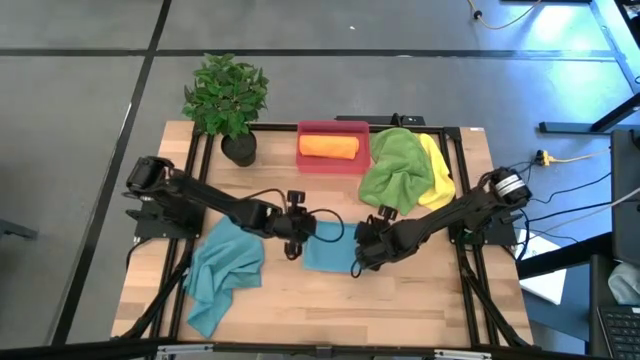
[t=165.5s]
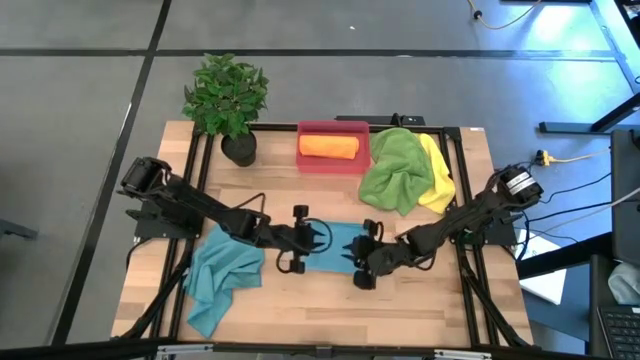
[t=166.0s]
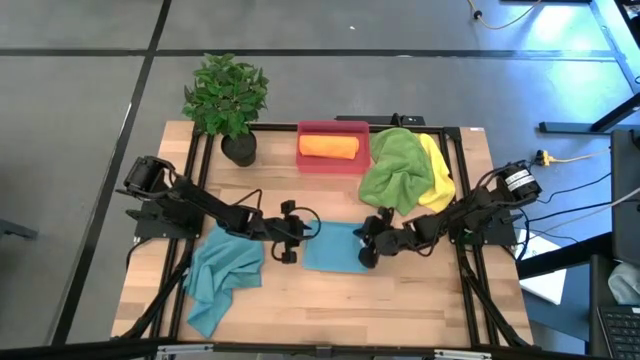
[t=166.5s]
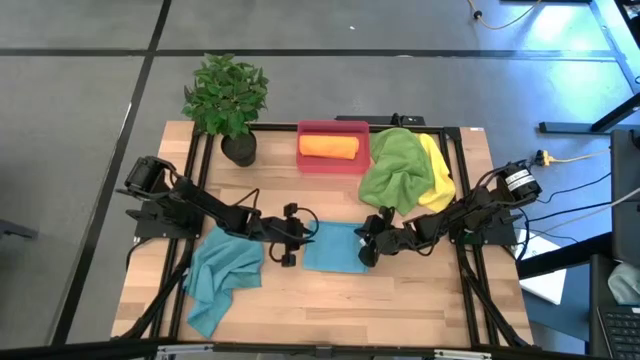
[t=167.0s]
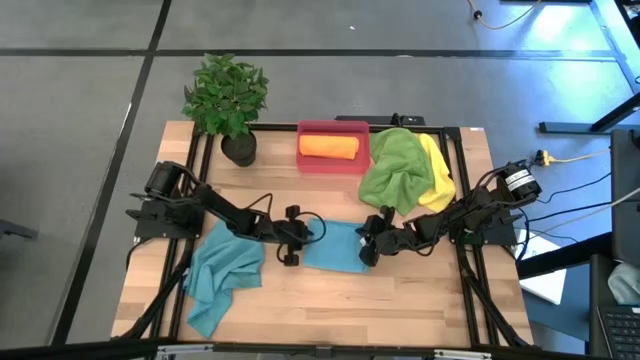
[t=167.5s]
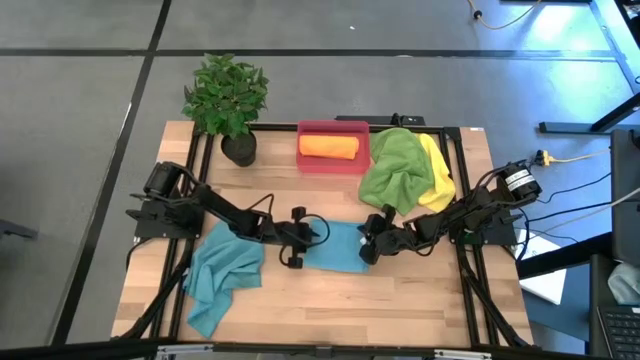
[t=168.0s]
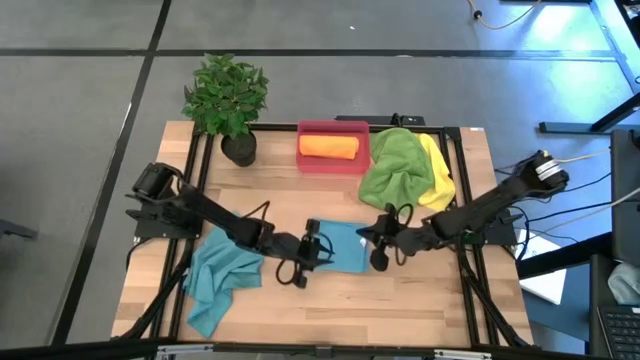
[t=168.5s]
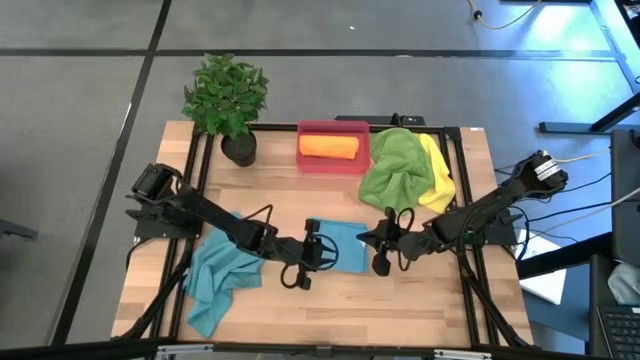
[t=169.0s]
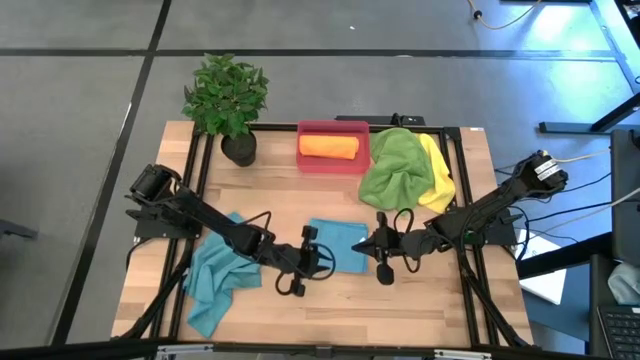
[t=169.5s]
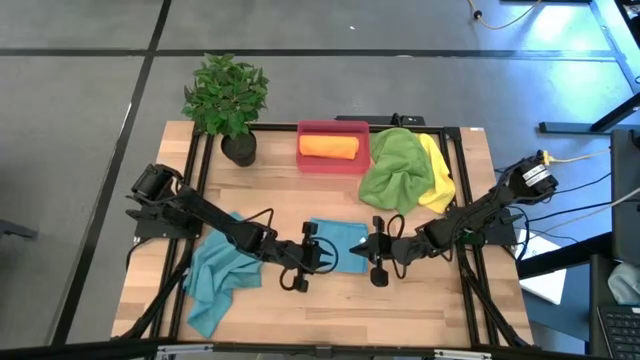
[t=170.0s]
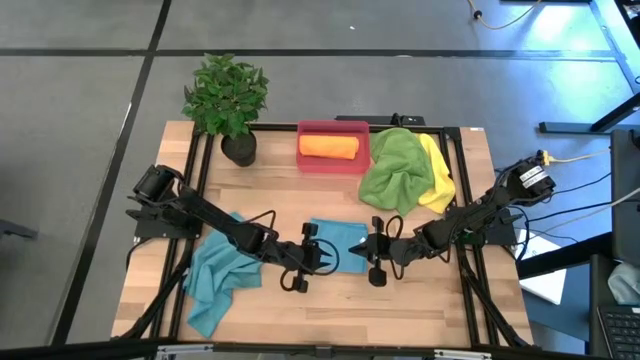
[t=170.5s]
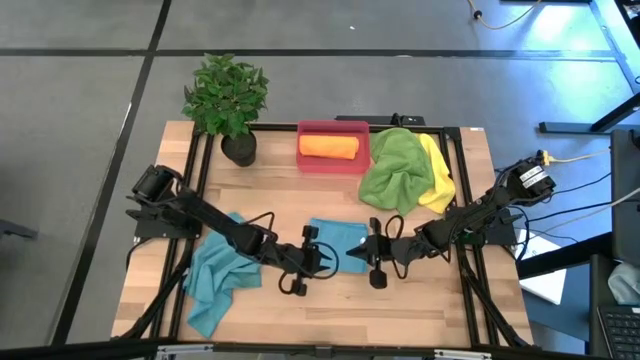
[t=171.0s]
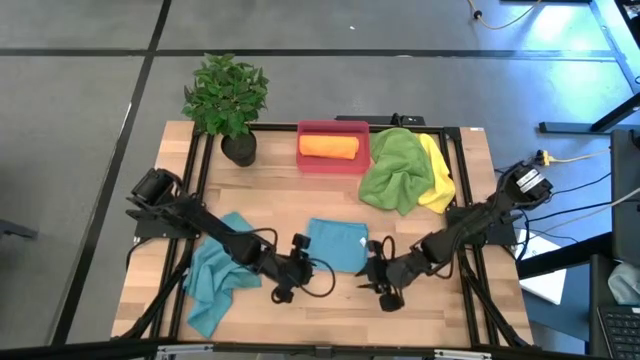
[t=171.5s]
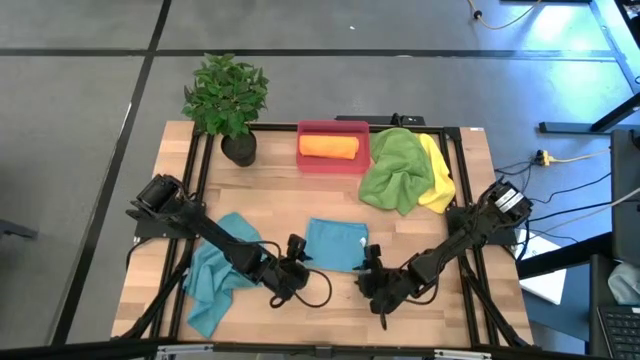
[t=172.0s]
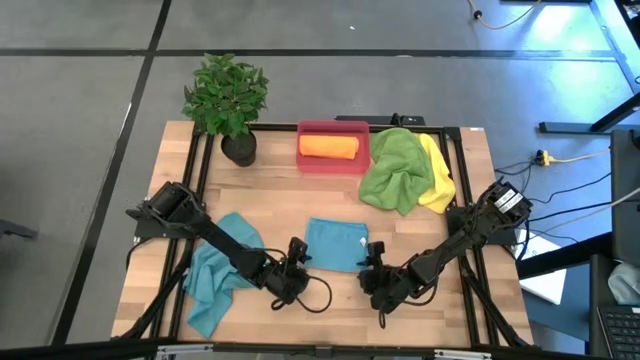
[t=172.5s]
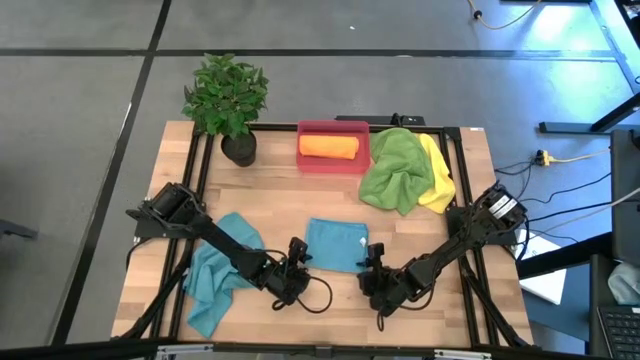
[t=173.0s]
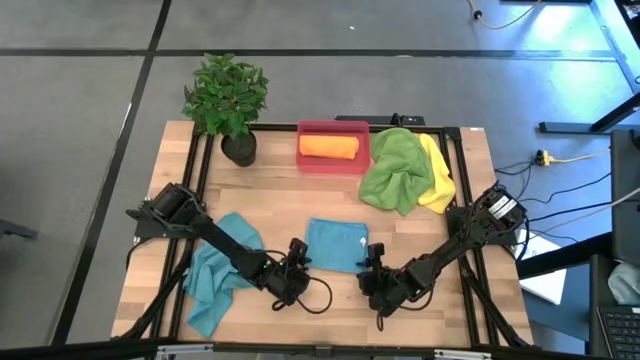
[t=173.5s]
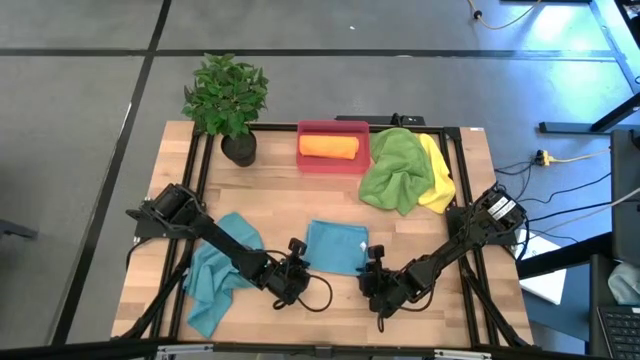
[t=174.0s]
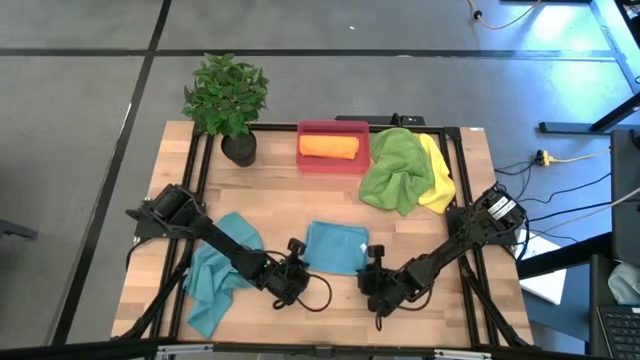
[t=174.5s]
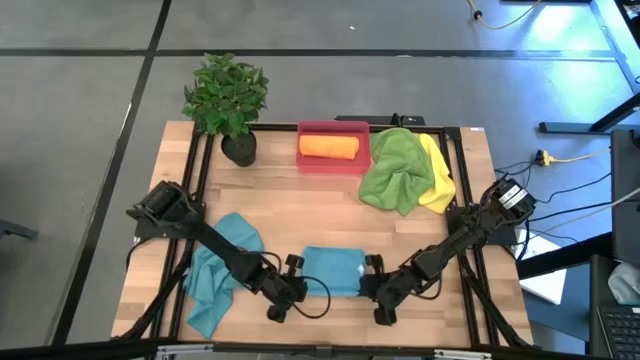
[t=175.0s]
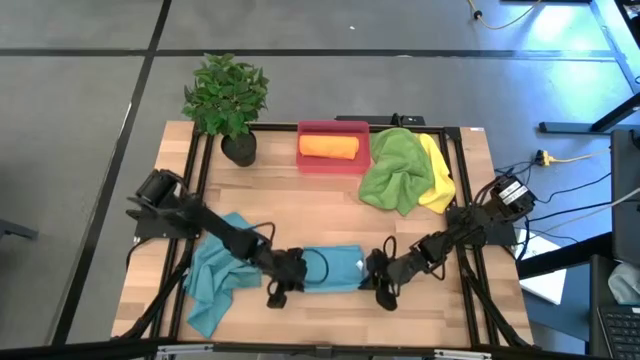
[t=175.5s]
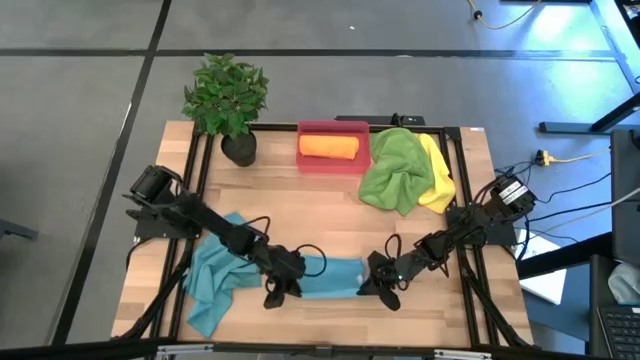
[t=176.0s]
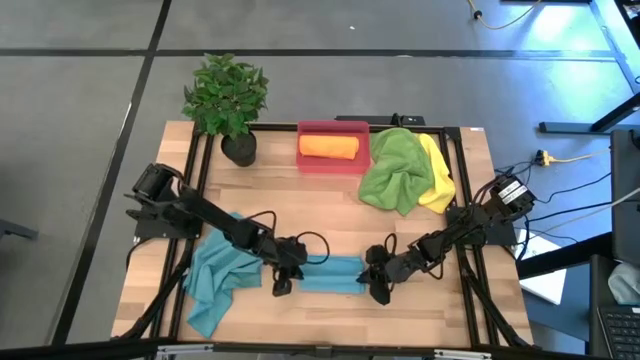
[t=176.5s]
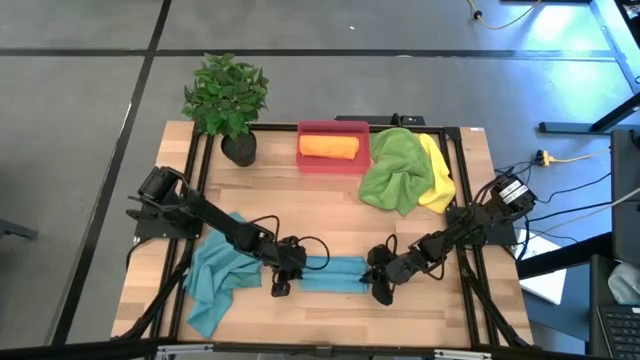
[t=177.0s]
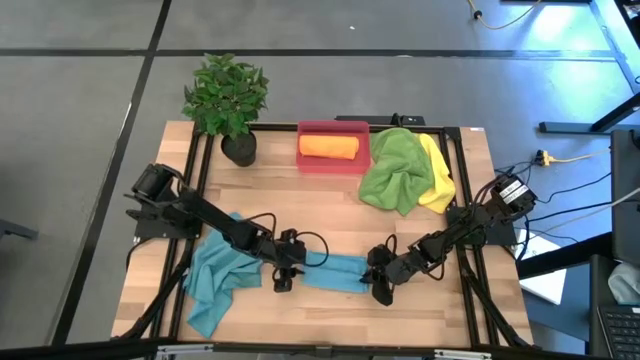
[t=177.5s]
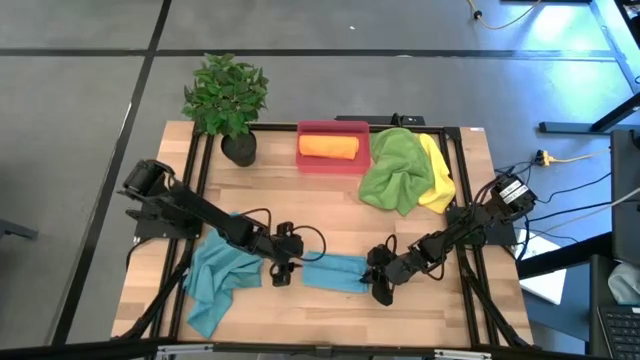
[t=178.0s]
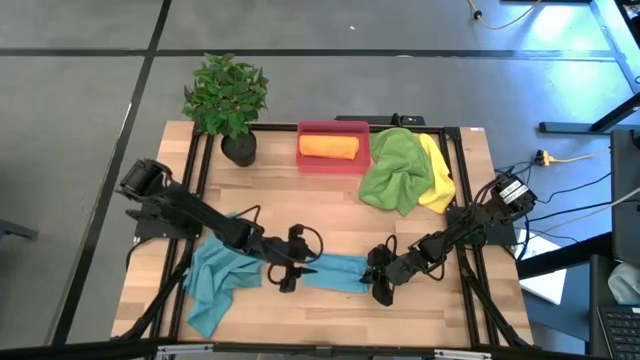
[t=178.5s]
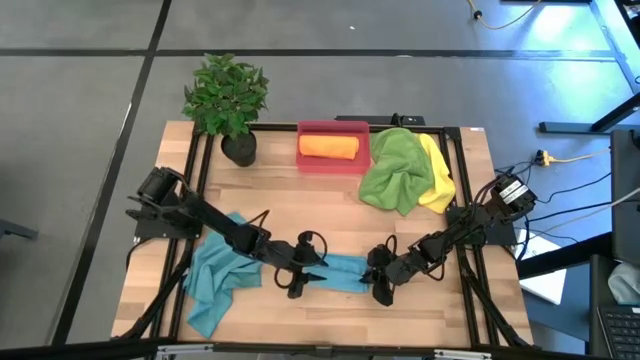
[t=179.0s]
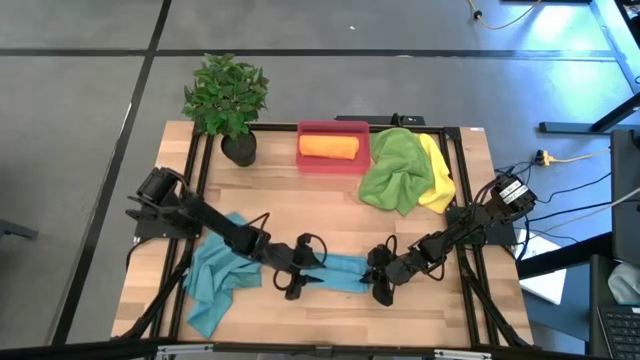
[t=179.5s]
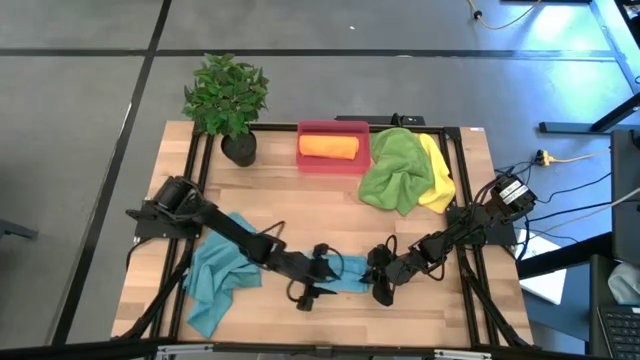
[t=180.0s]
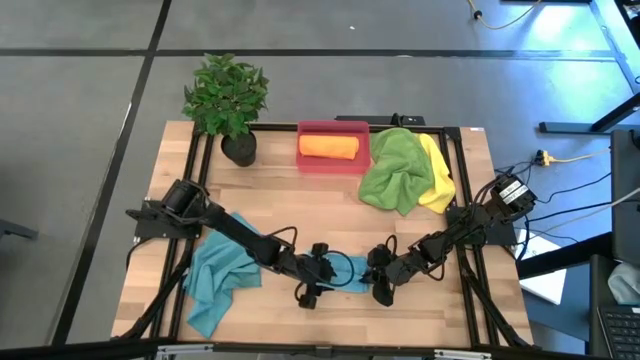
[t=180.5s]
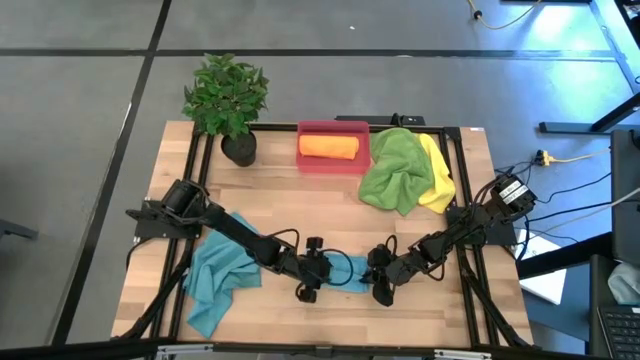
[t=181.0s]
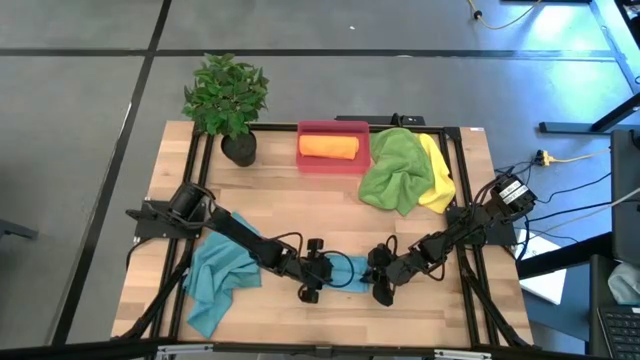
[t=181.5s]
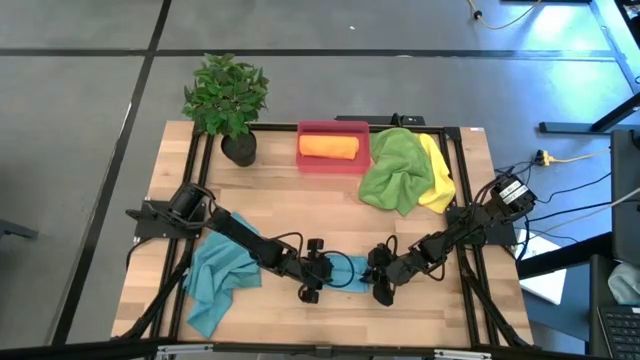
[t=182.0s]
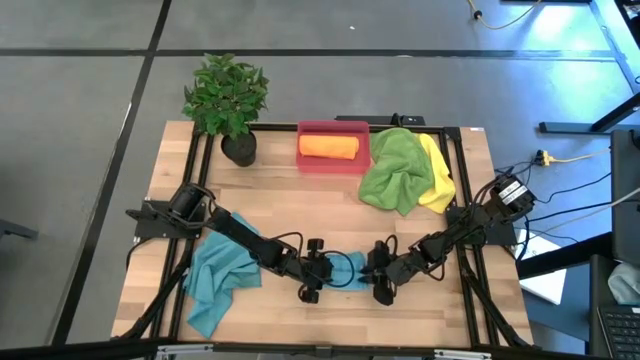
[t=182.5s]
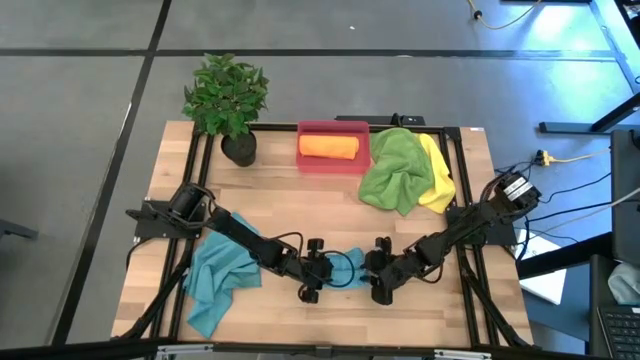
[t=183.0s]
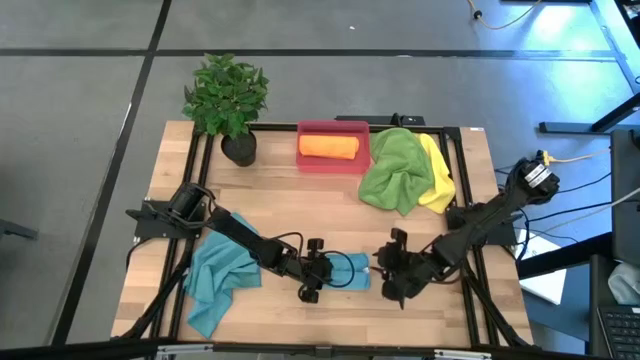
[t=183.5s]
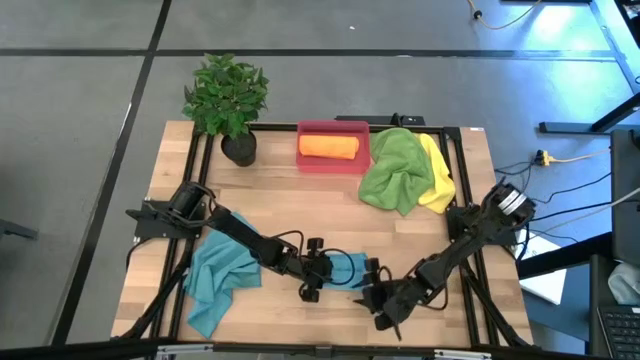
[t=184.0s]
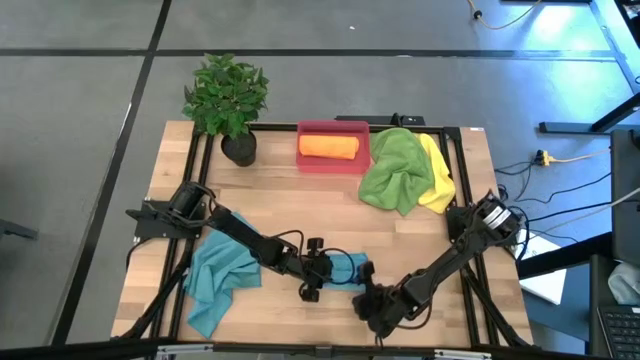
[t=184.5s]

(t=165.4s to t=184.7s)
Task: Roll microfiber towels into tight, uniform cylinder then place into a basket
Roll the right blue towel

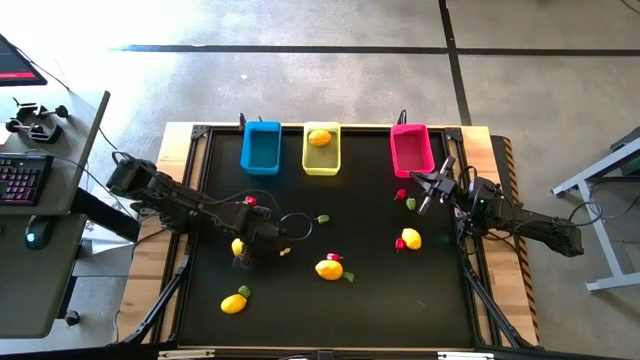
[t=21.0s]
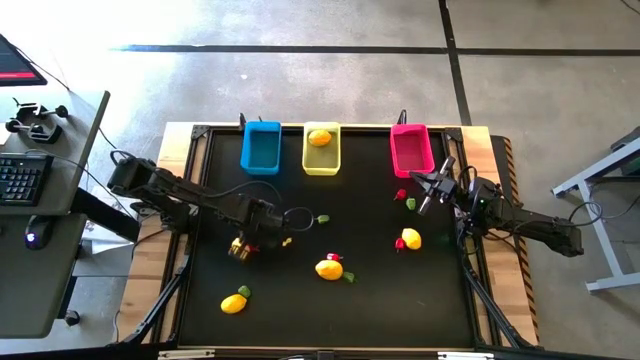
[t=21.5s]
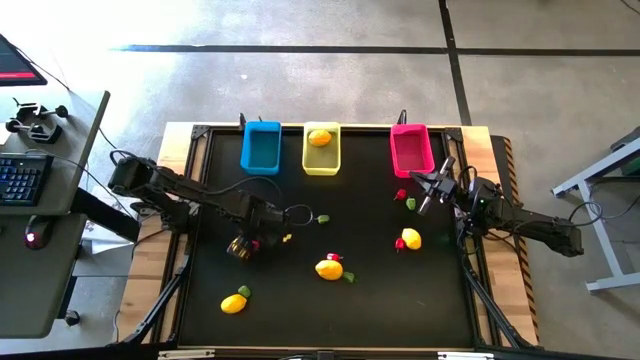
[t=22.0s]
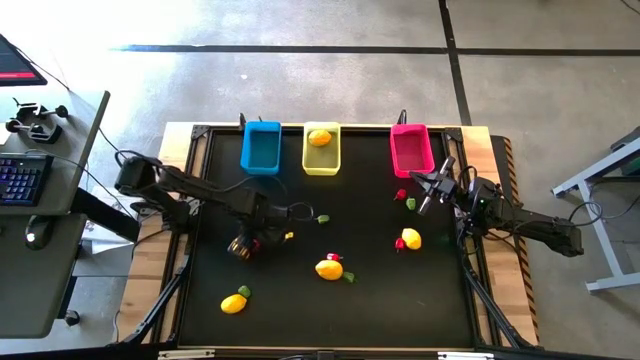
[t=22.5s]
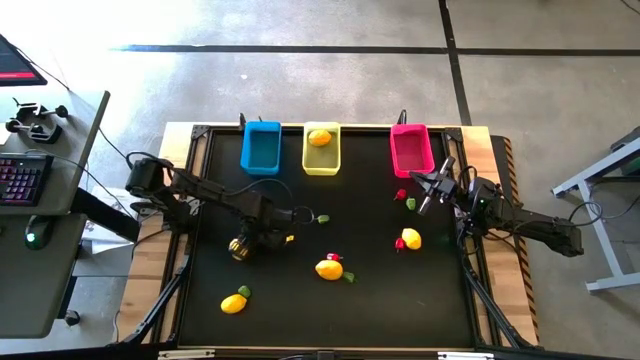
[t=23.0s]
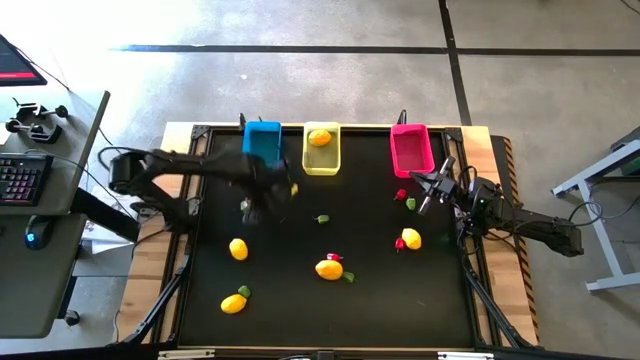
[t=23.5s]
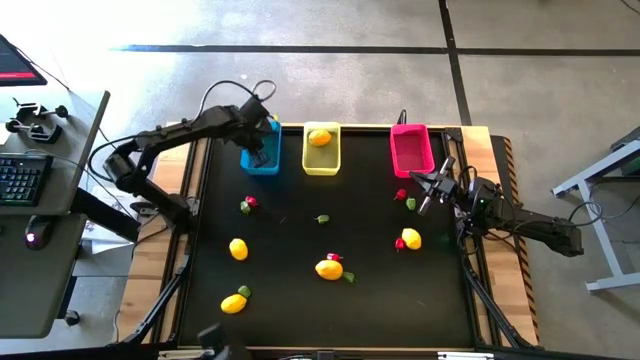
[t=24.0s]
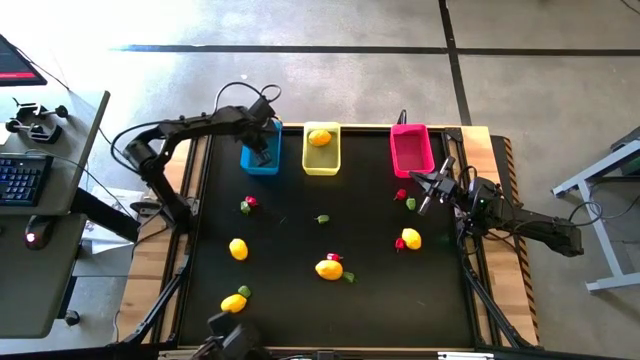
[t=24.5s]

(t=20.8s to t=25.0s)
Task: Sort produce into baskets
Put the red bell pepper into the blue bin
